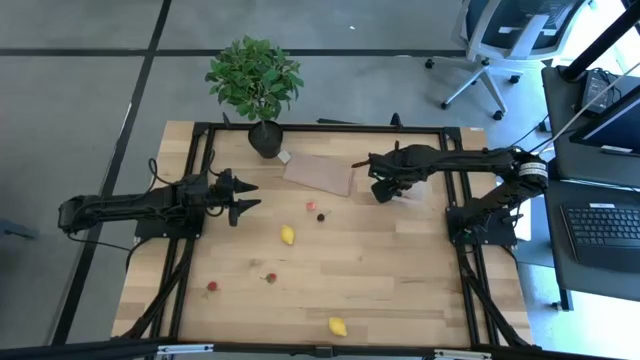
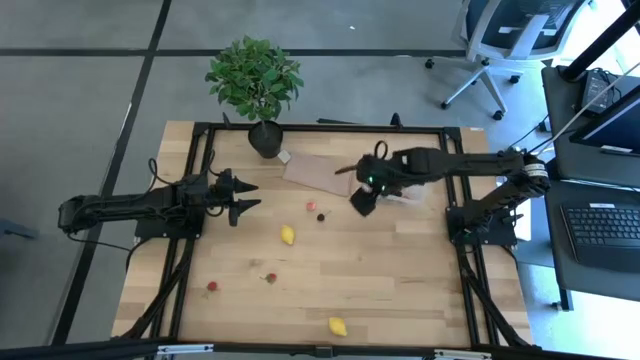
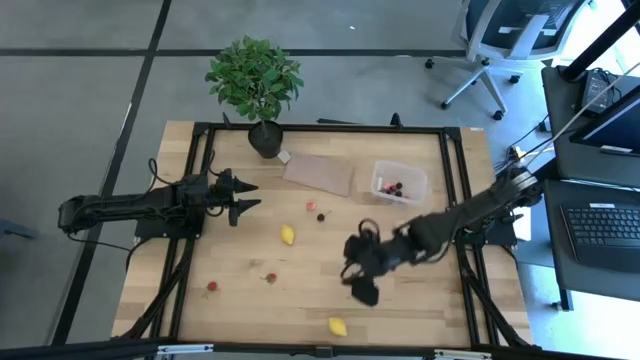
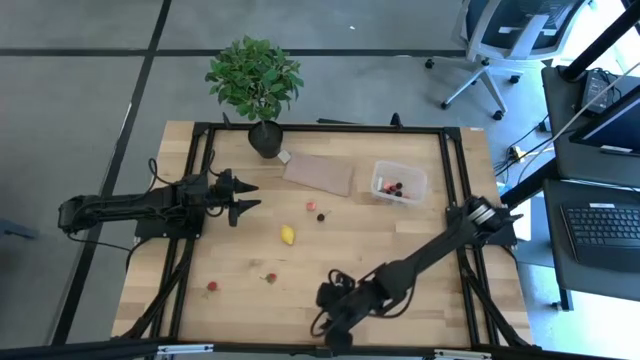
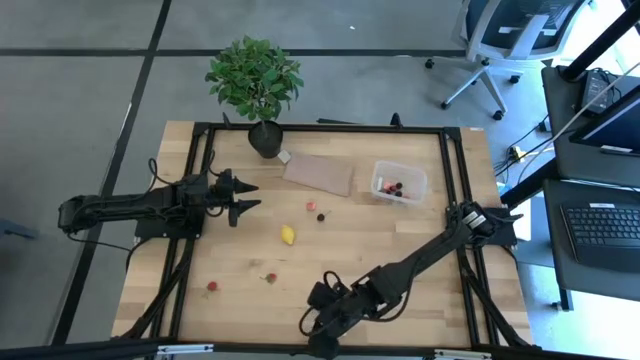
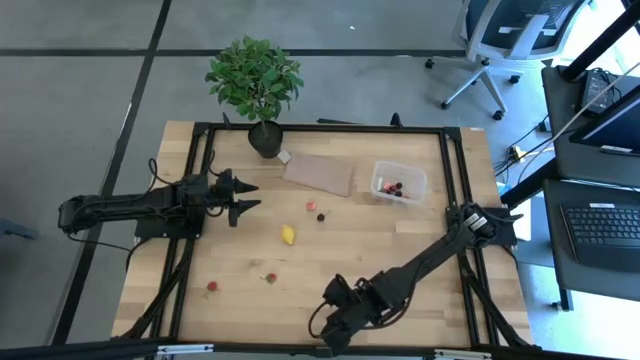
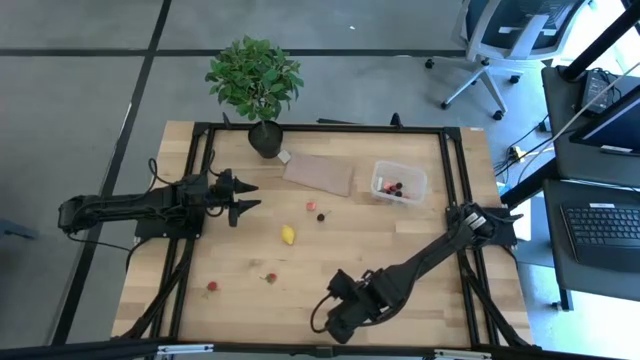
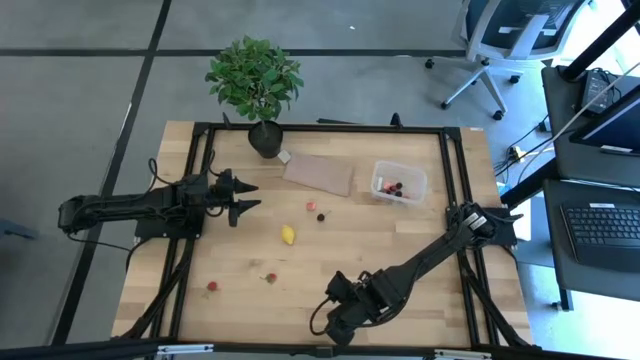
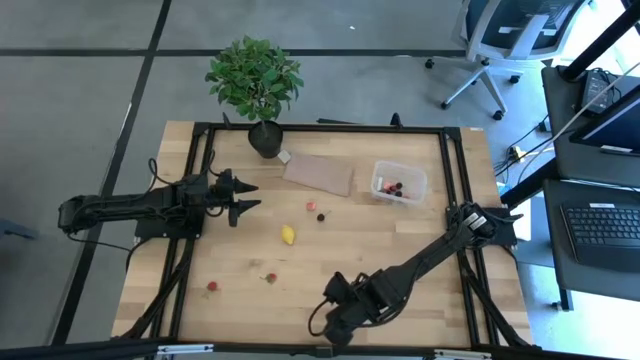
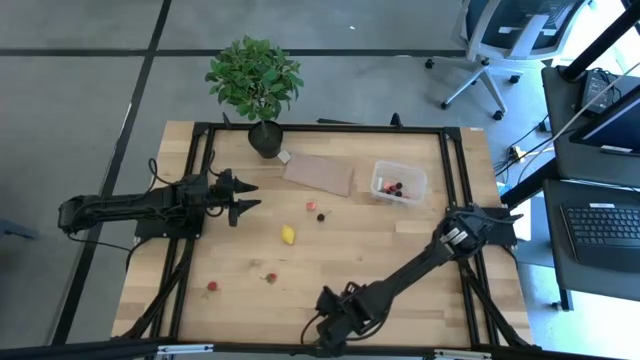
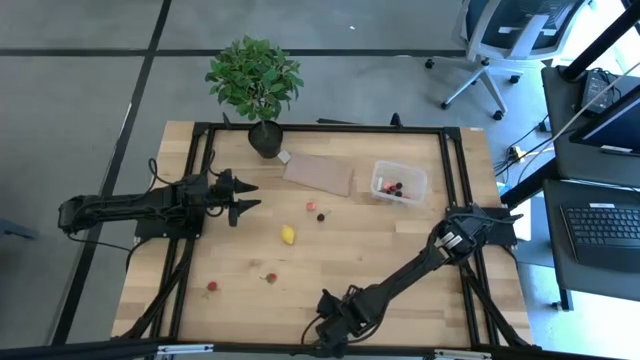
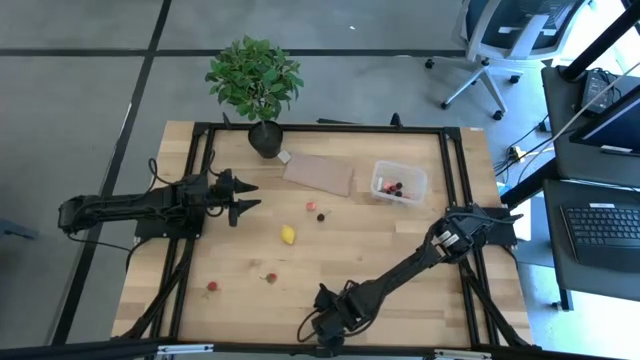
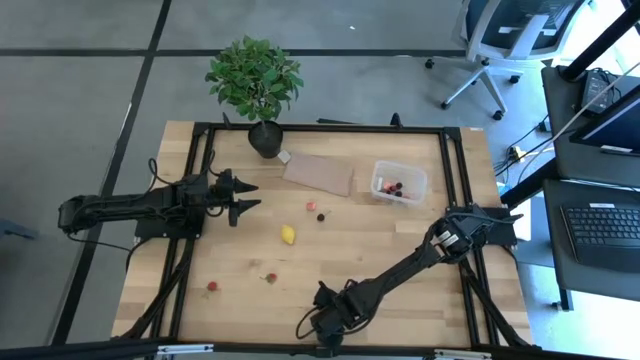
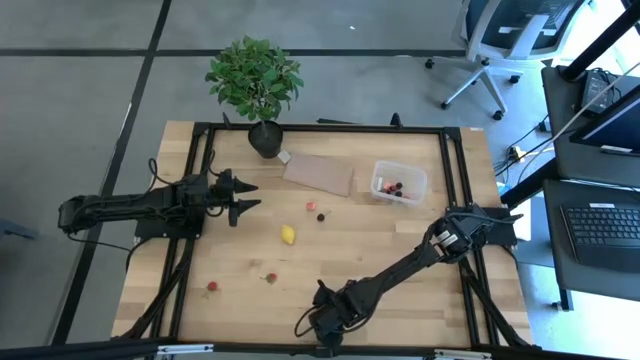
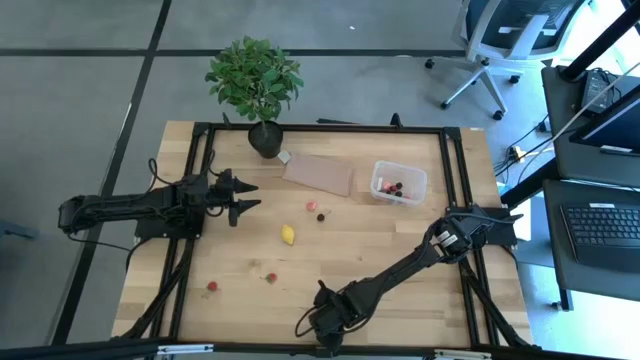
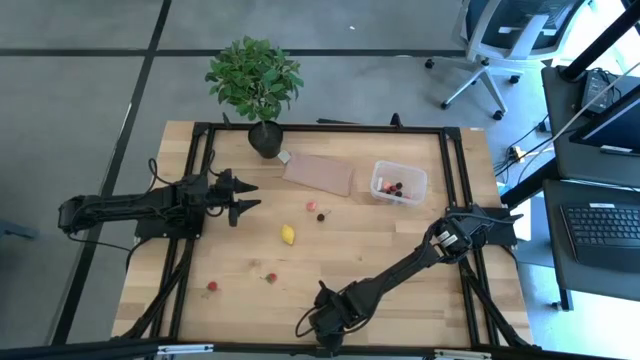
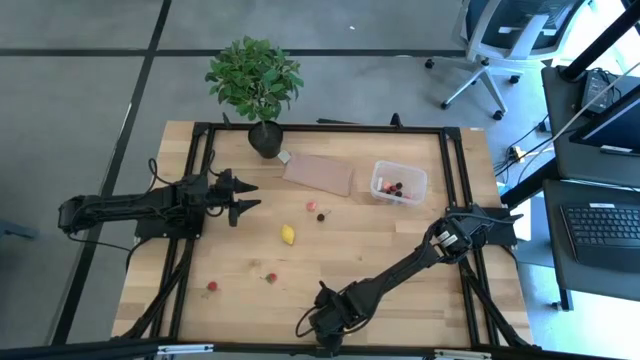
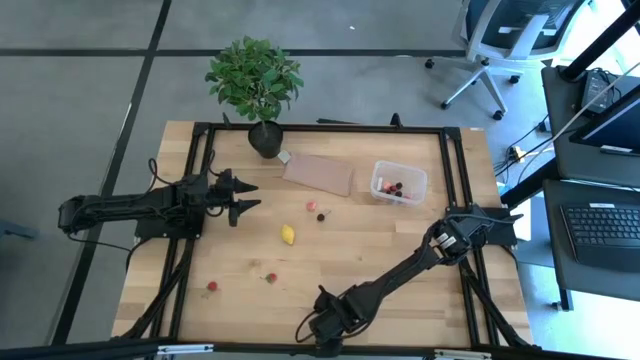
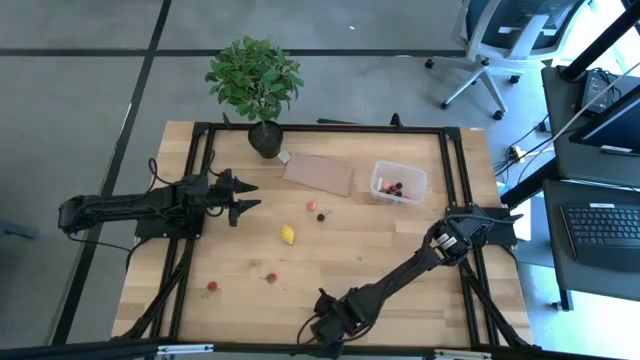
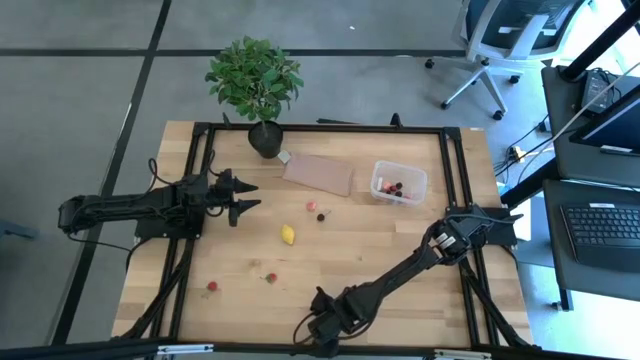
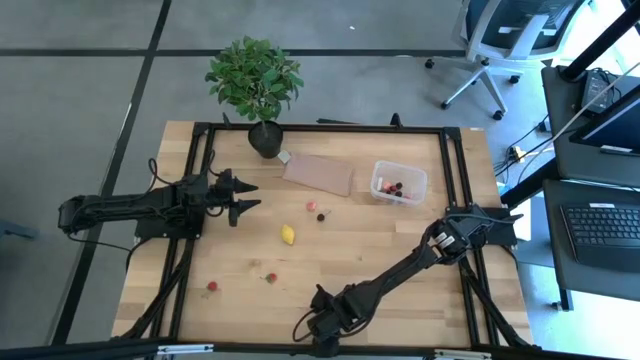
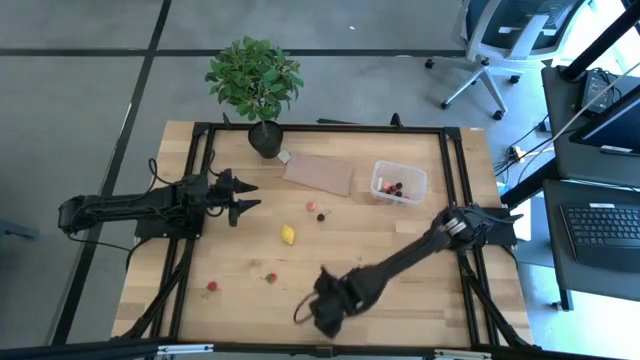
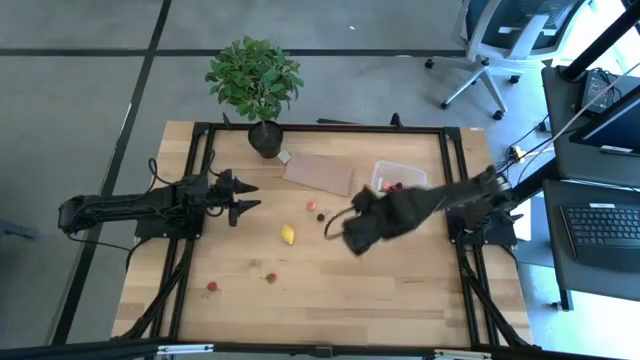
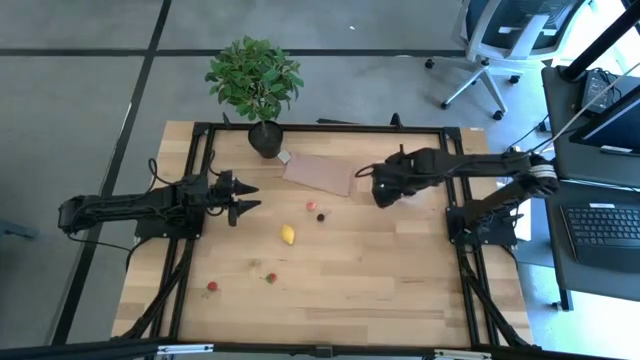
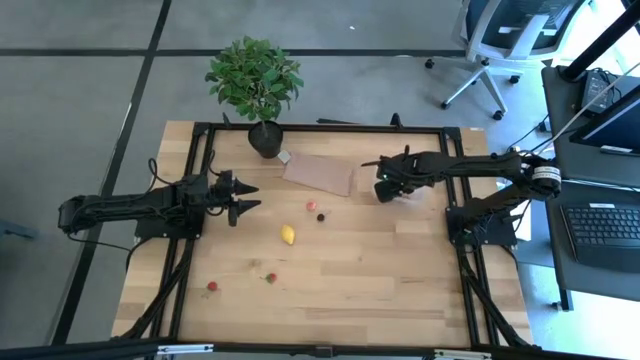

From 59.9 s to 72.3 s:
Task: Pick and placing Produce into tupperware
Put the bottom yellow lemon into the transparent container

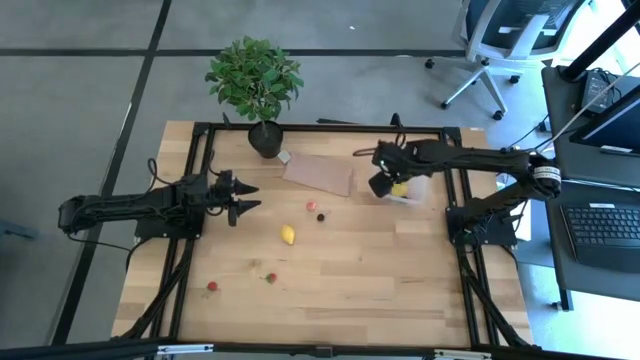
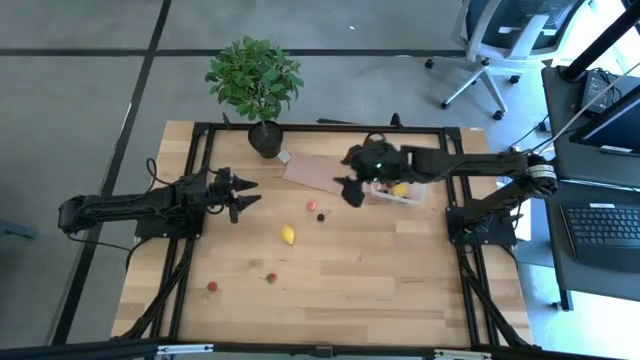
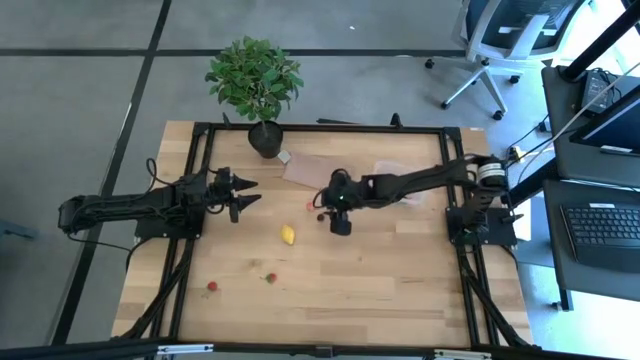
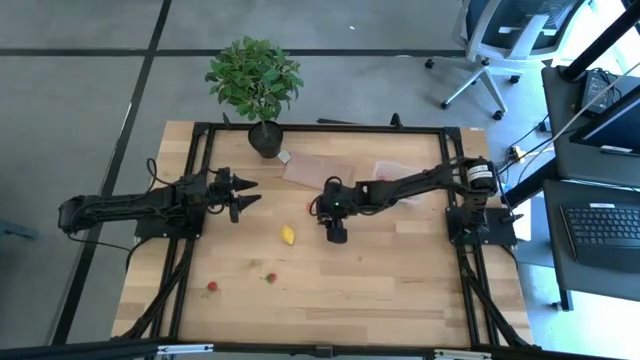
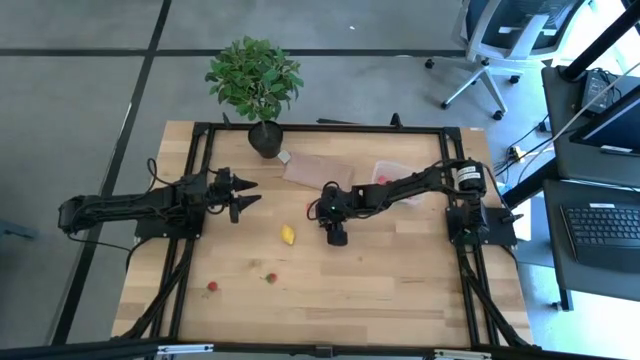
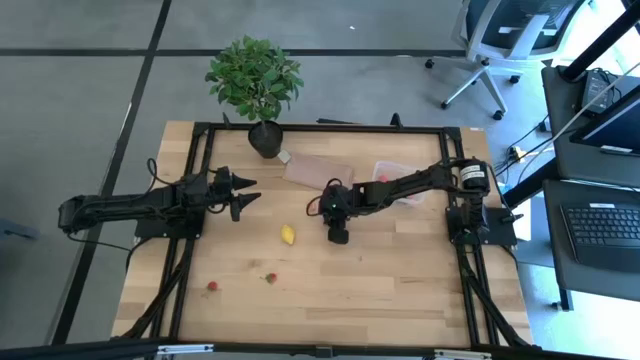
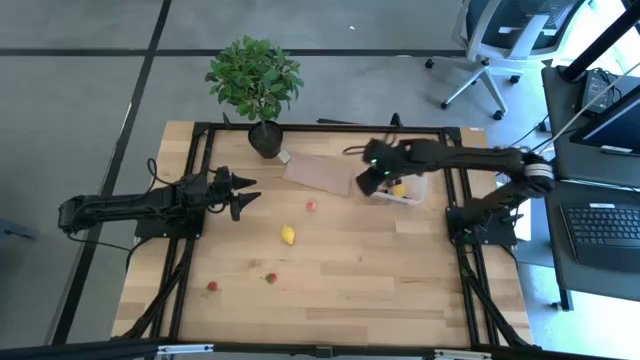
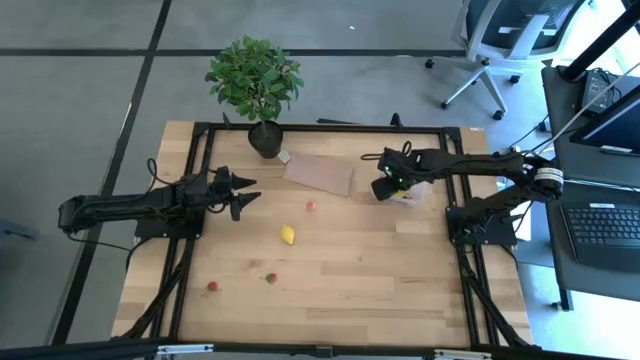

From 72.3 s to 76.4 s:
Put the black cherry into the transparent container

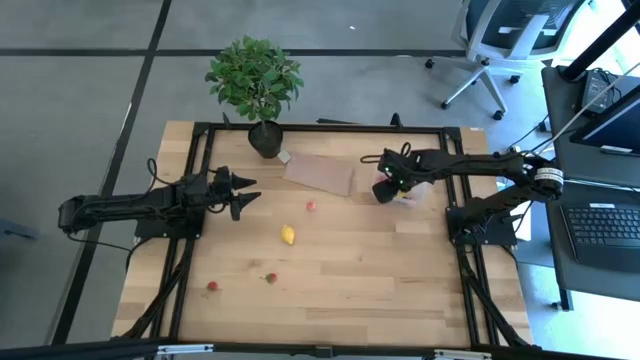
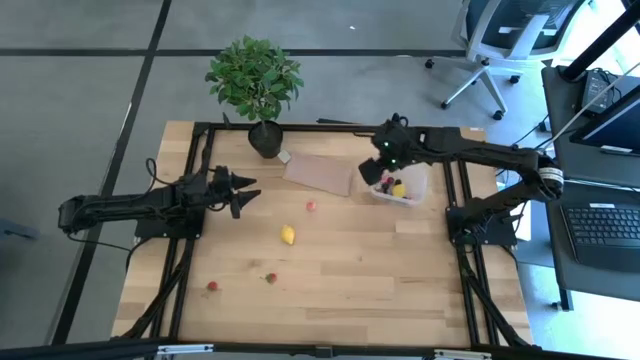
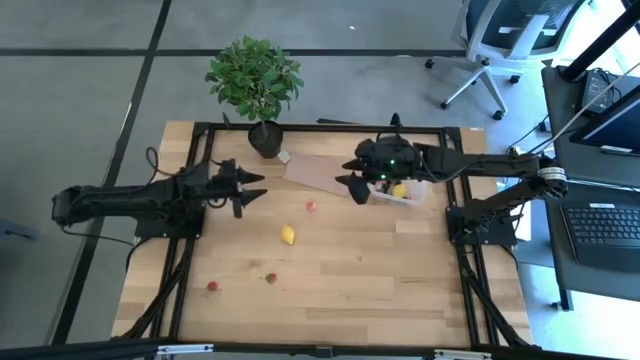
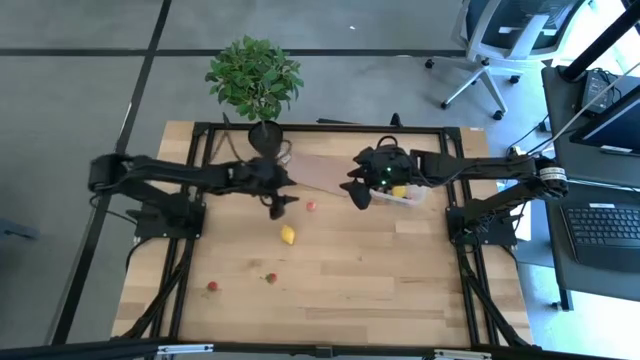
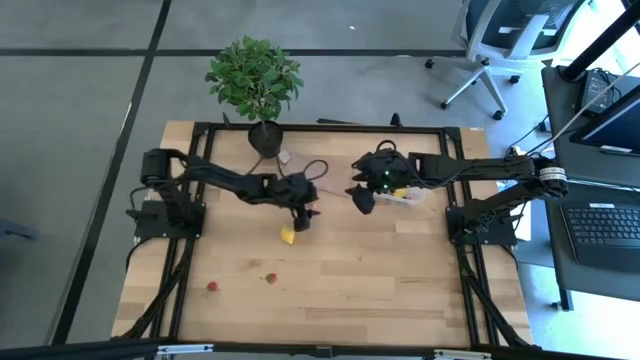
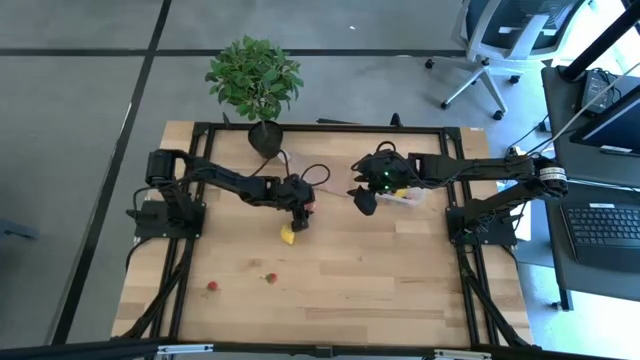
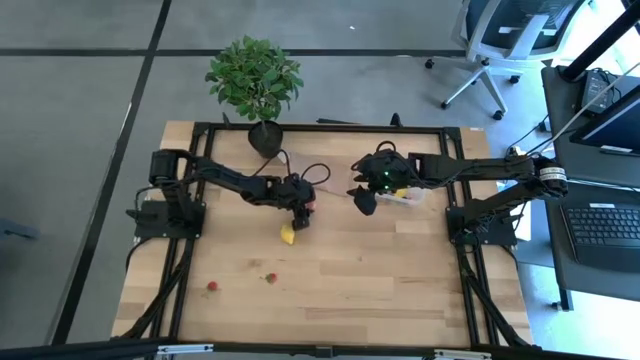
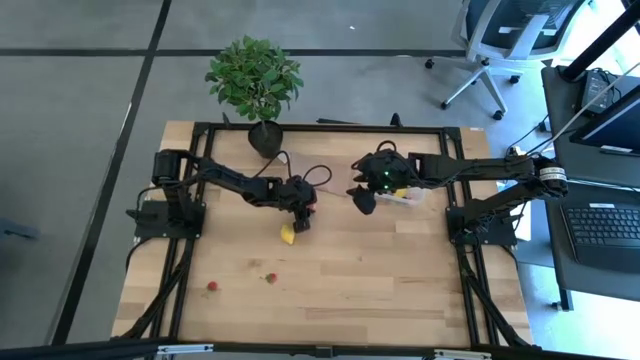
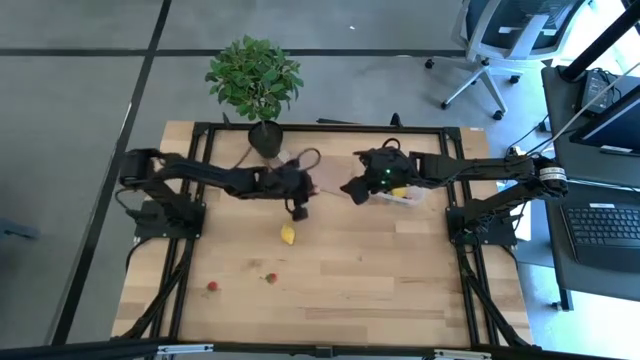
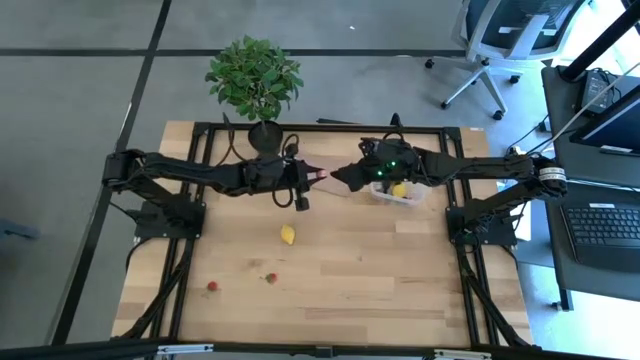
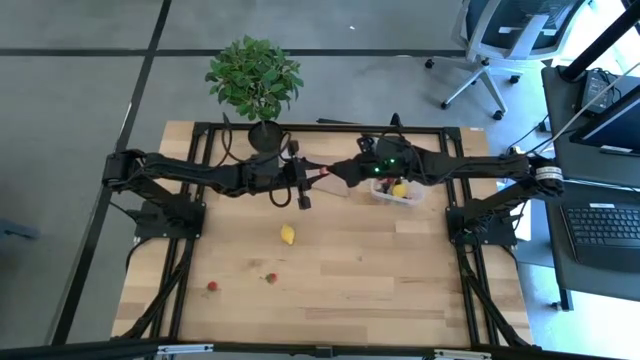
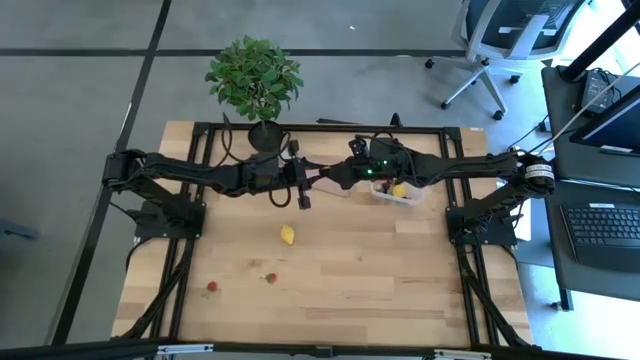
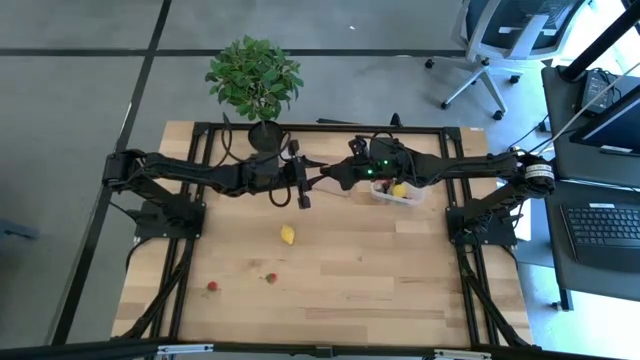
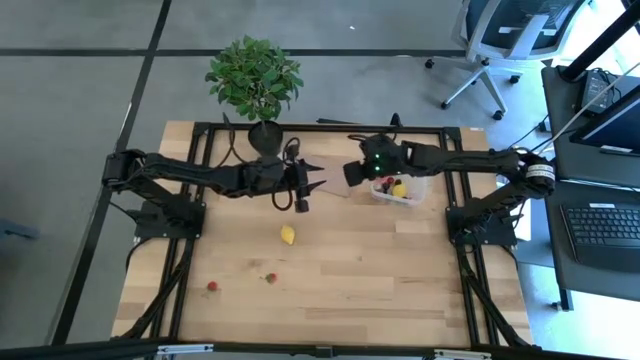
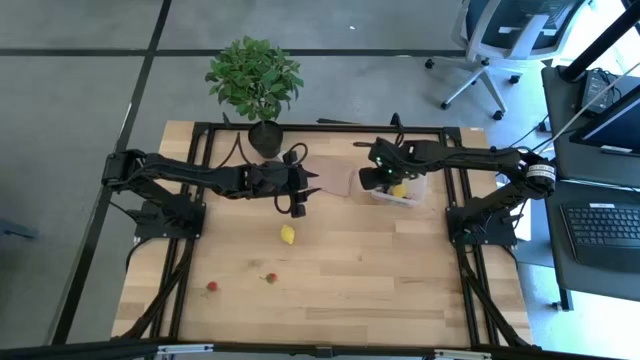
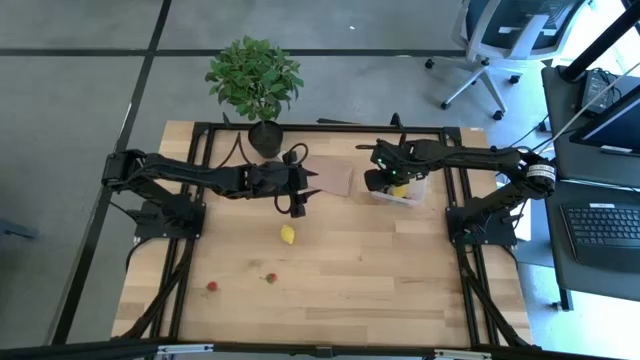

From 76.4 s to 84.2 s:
Put the pink peach into the transparent container
